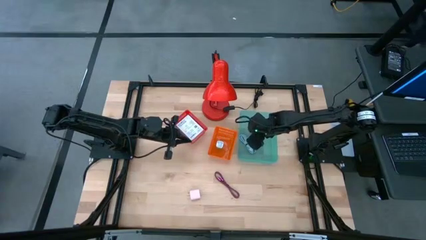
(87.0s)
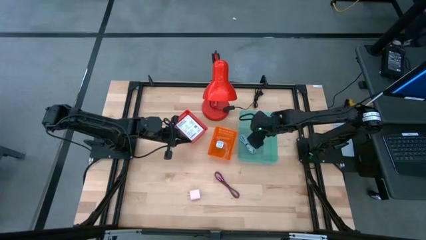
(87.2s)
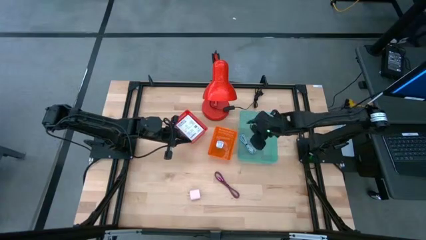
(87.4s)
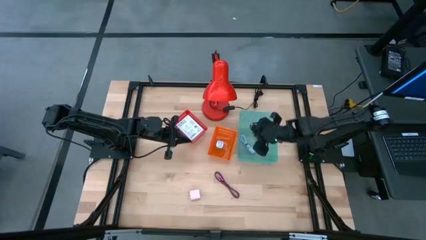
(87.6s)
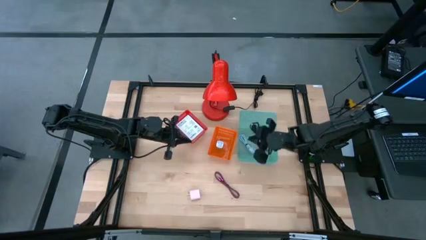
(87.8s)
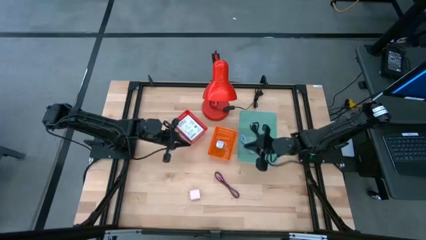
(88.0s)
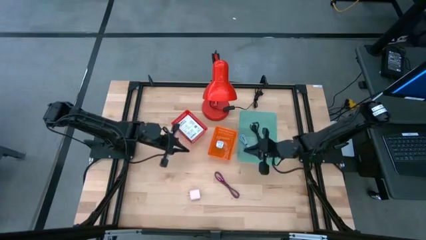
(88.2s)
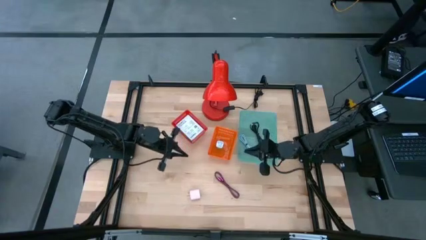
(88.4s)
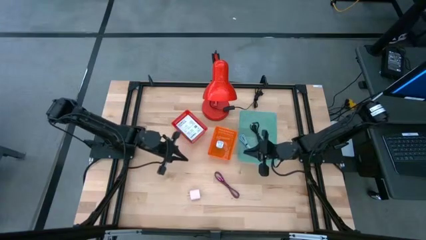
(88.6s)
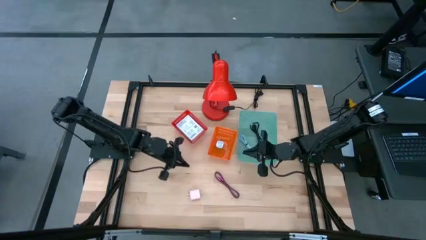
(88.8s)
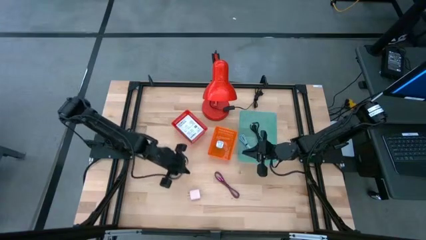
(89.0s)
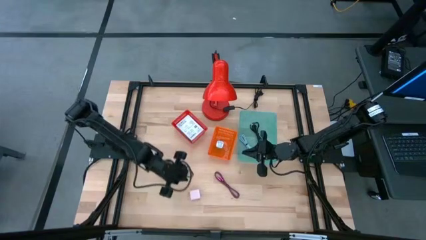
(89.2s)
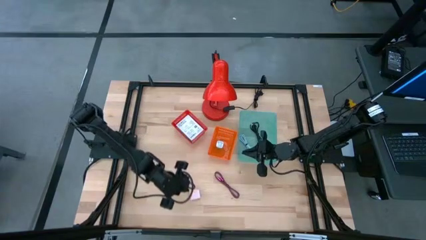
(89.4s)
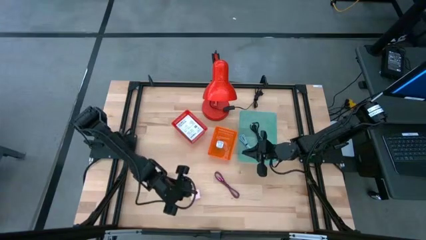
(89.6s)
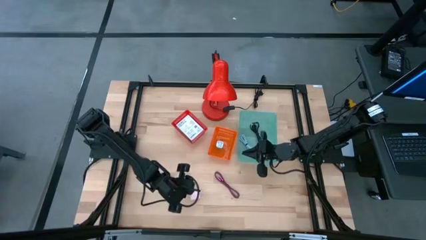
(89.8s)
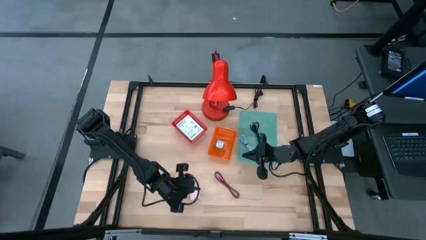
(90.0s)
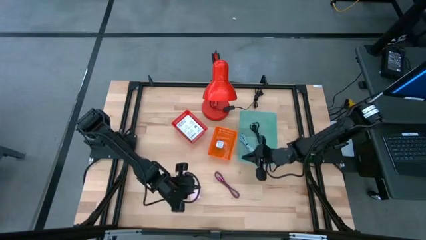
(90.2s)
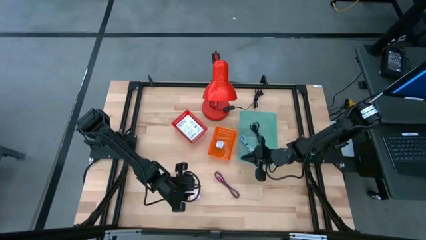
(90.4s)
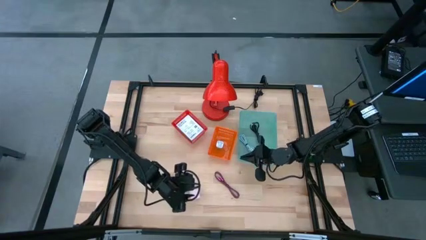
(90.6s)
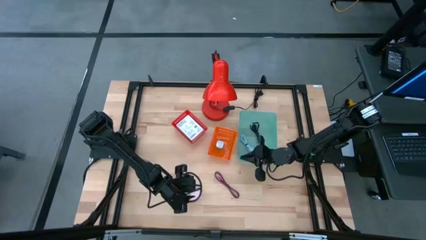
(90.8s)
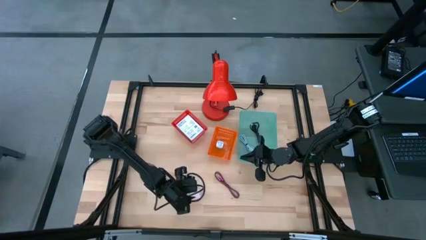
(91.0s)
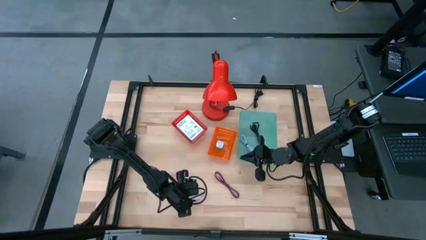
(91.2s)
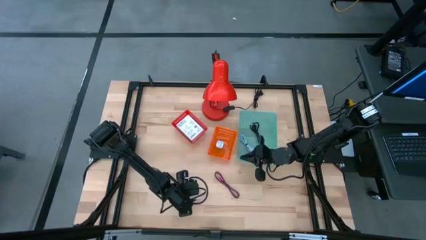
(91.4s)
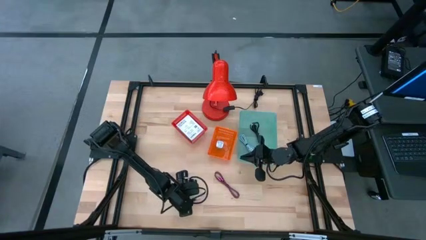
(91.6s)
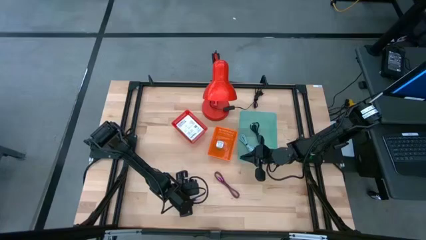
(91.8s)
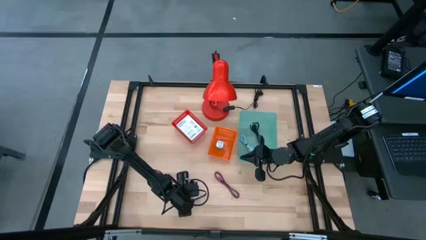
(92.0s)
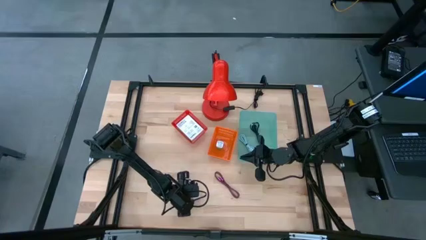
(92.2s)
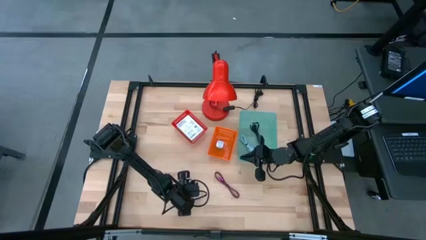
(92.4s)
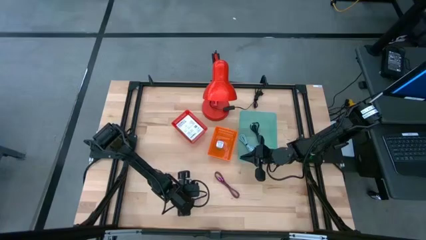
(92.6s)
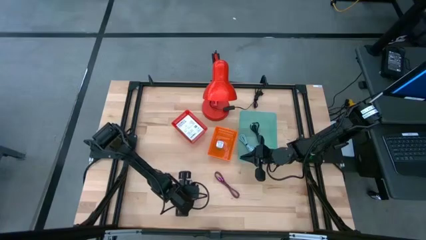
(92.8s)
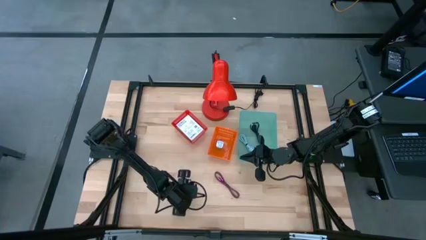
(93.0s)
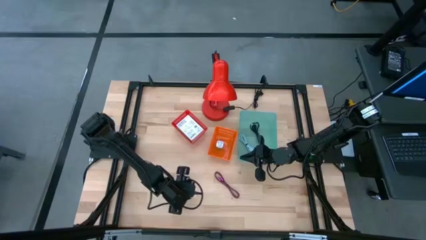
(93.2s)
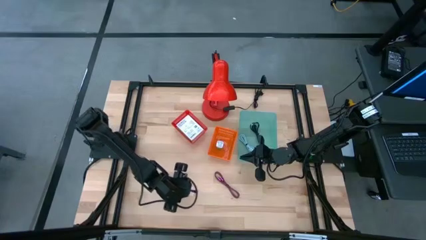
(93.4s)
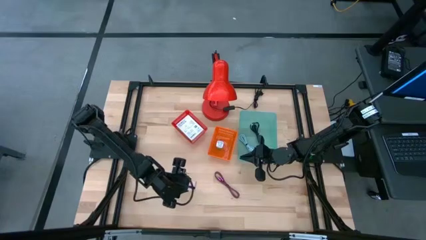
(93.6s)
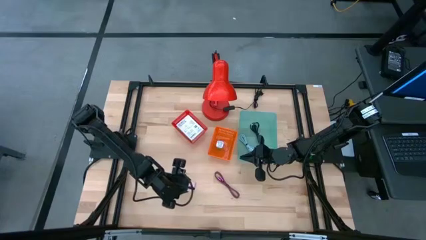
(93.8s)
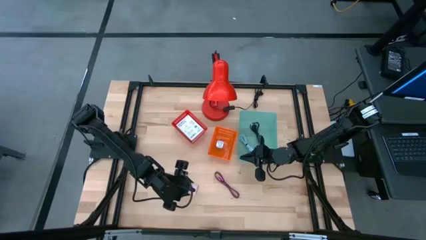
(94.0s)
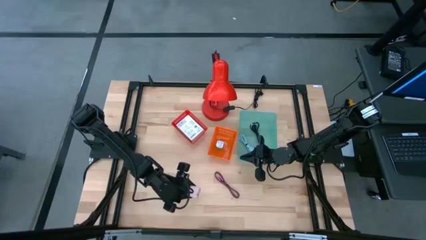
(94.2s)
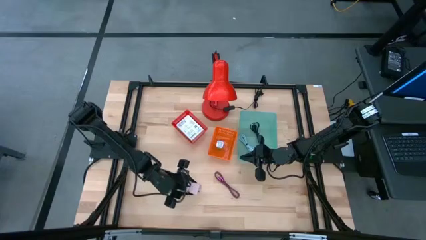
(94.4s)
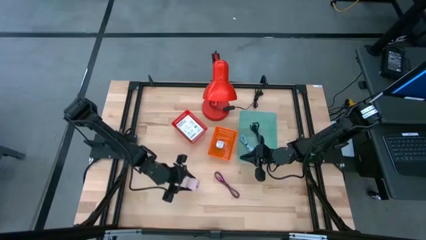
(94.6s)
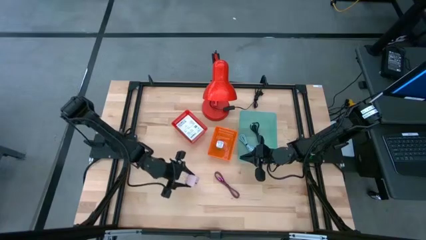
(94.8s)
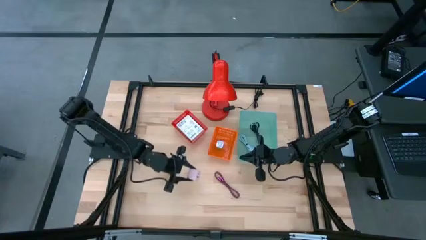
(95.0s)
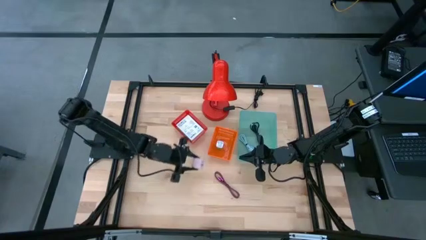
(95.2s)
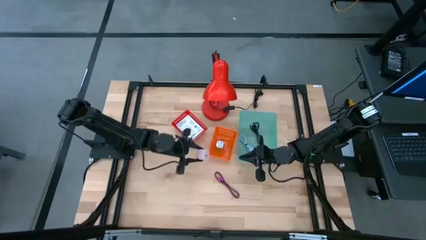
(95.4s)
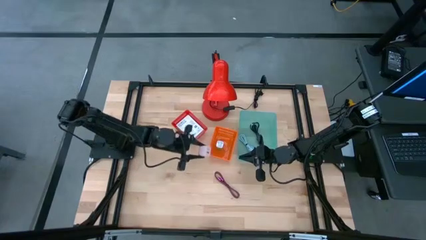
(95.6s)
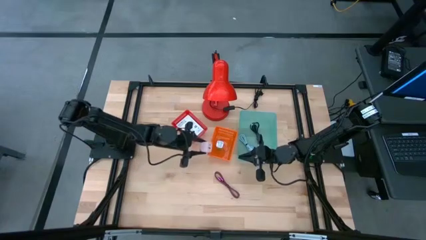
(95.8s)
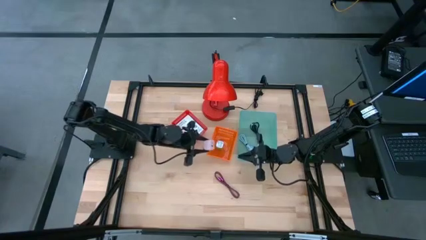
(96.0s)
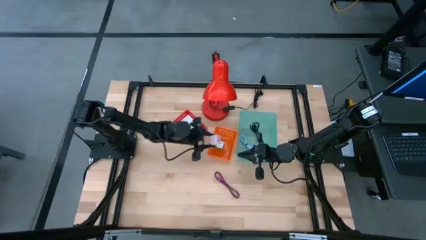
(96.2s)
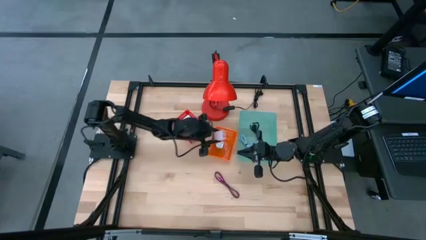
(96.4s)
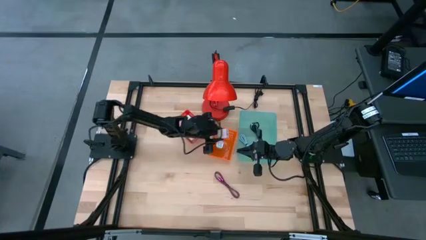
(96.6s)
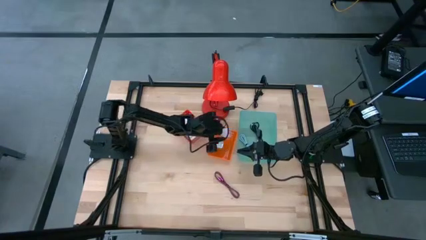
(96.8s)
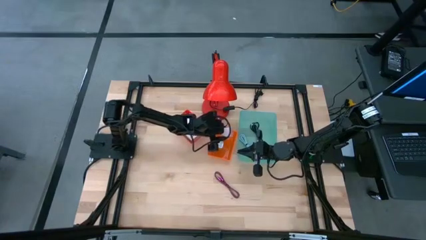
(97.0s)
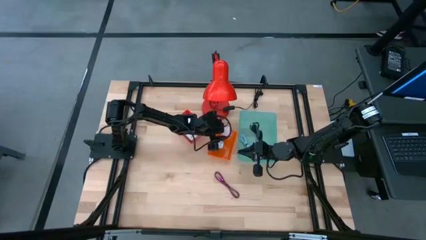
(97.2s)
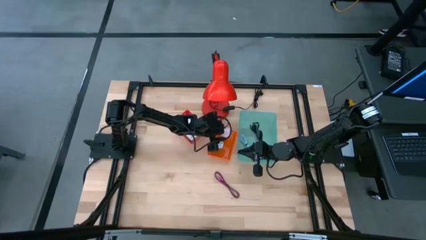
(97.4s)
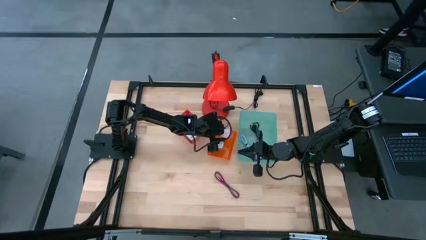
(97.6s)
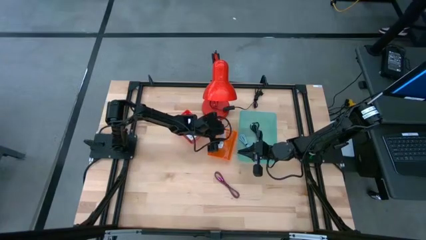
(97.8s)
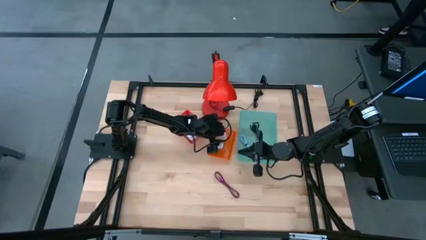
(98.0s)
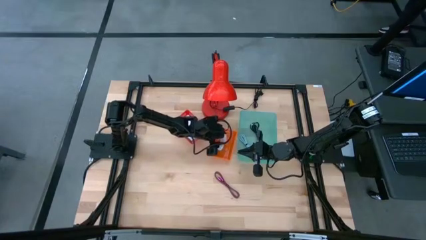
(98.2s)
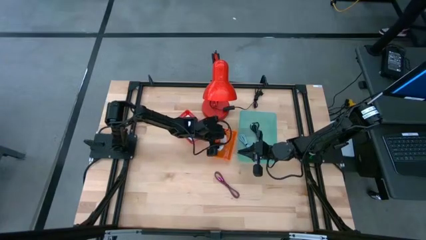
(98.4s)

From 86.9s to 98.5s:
Task: Pick and place items into bin
Put the white charger adapter into the orange bin

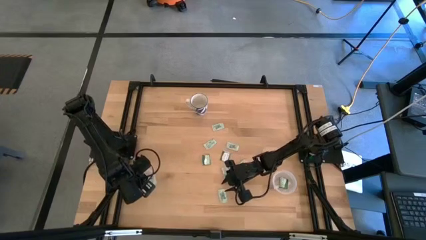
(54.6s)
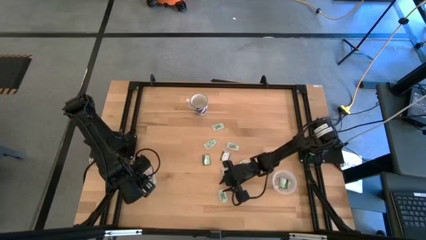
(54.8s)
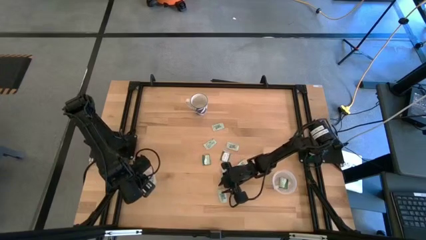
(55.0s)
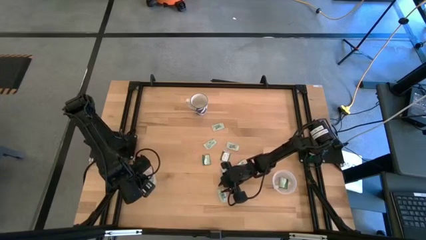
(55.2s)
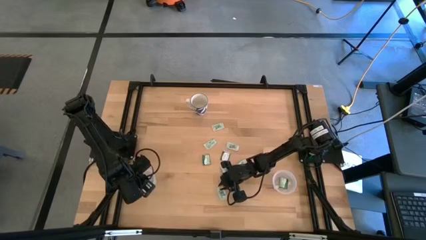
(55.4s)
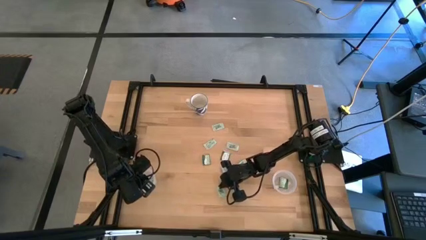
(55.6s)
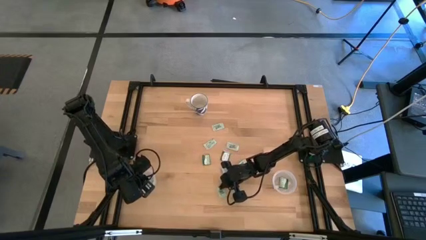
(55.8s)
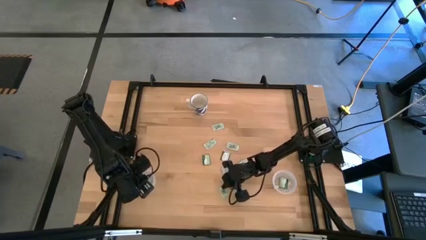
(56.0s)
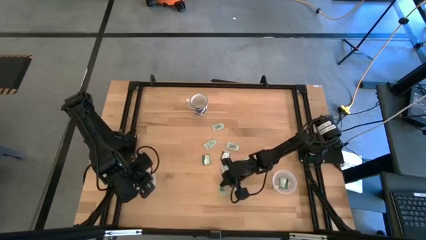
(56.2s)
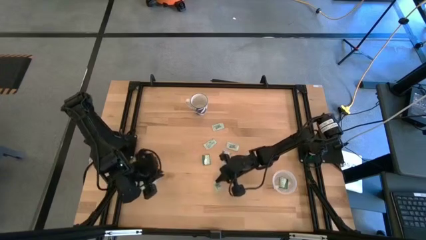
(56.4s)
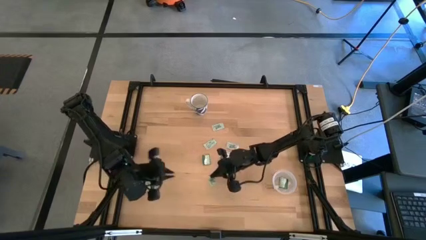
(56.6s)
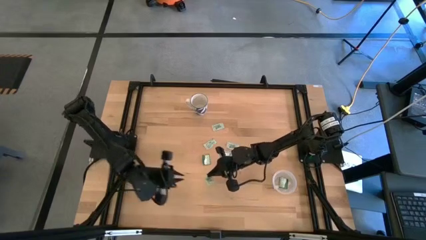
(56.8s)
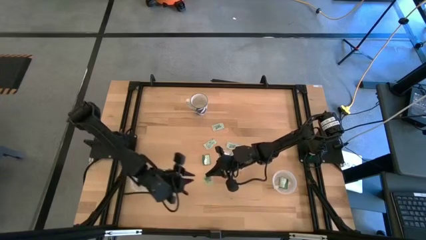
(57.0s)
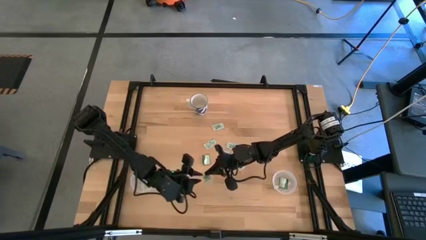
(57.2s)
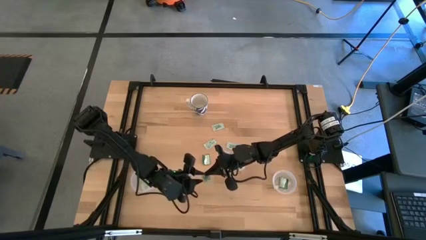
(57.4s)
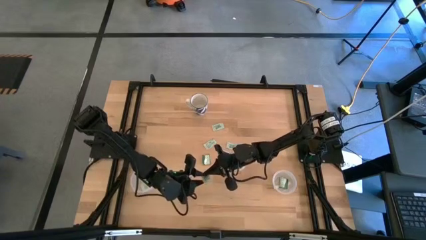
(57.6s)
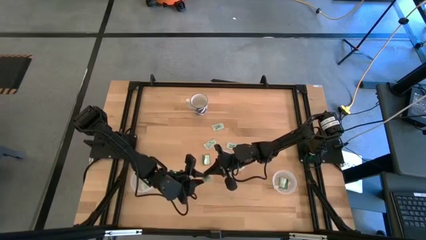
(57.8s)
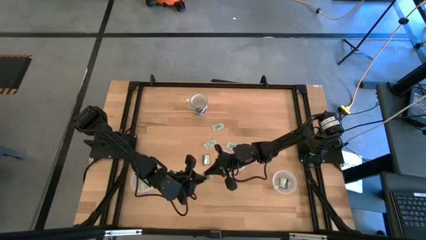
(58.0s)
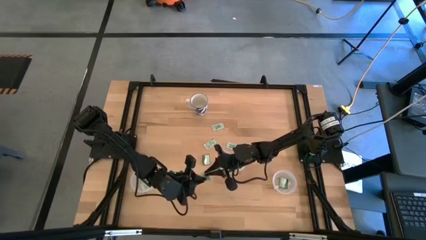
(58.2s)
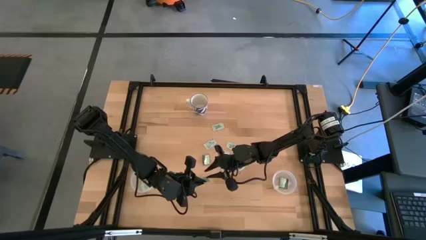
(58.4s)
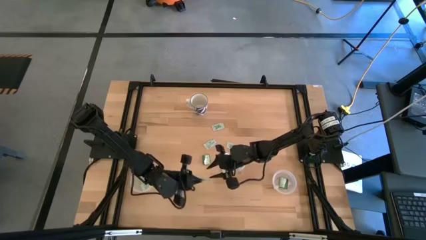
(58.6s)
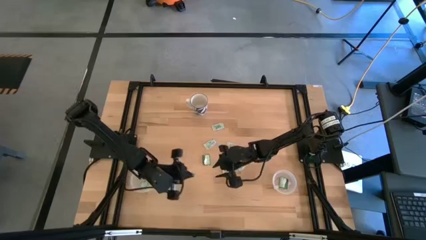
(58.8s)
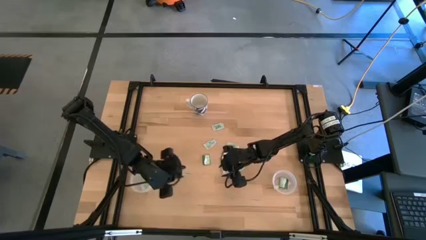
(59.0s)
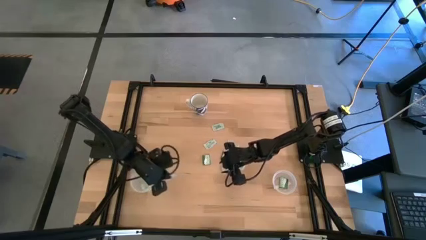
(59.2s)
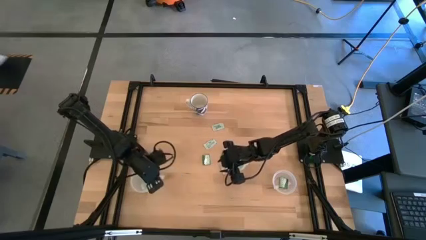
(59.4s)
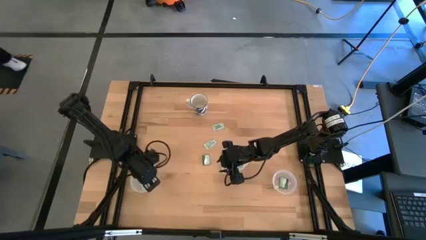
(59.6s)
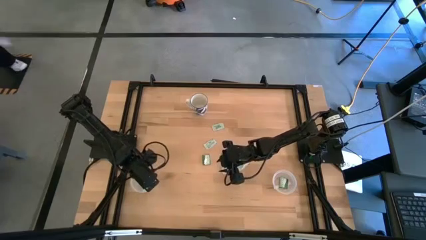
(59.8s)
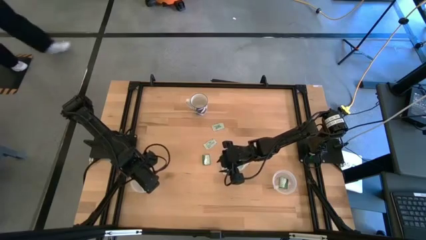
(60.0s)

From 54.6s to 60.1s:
Task: Pick and place Stevia / Truvia into bins
Put the light green stevia packet into the left transparent container

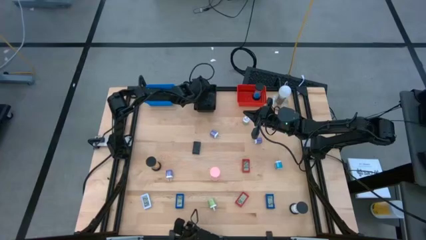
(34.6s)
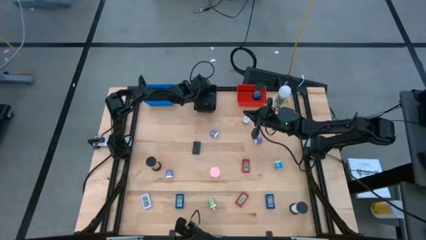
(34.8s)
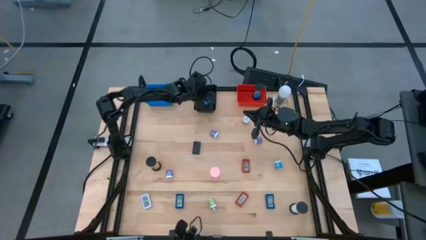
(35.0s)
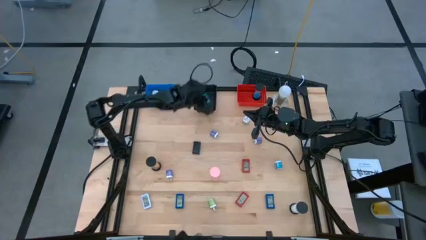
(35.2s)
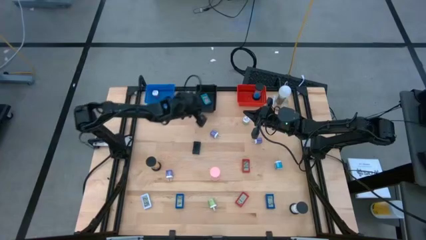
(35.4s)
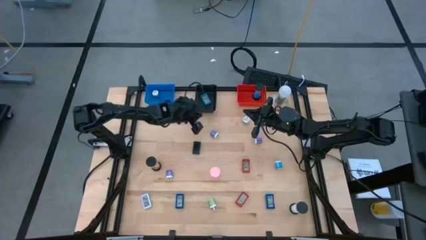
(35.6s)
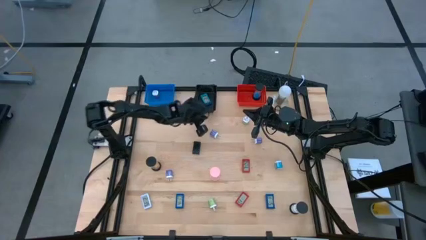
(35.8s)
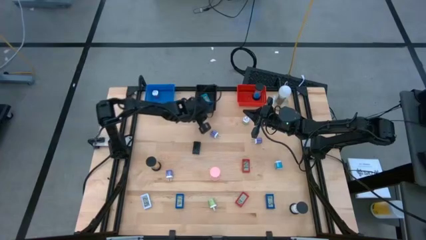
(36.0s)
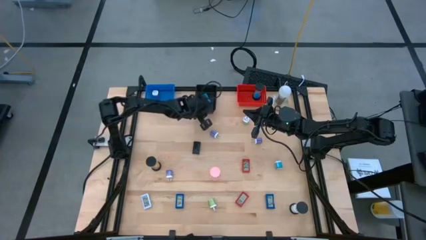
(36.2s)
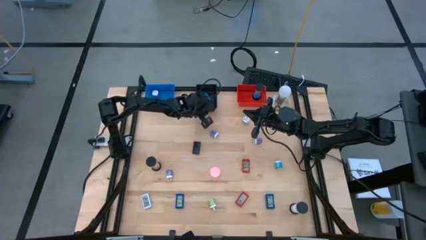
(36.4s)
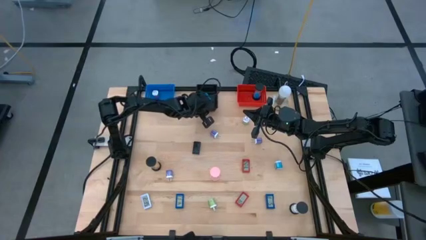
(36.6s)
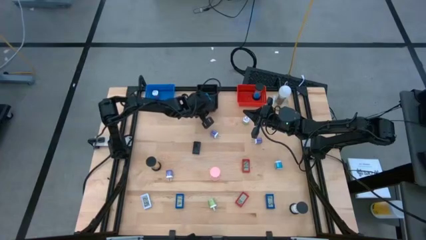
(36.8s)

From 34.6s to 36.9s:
Task: Pick & Place Office items
Adjust the black bin
